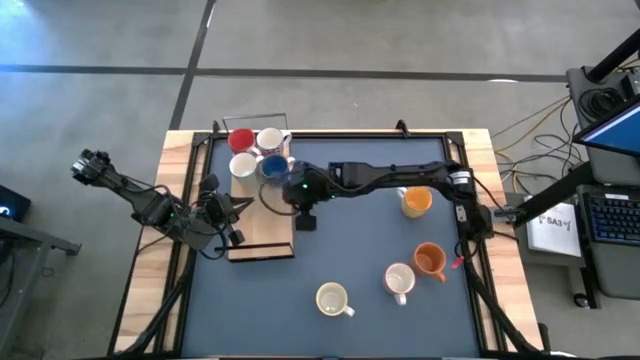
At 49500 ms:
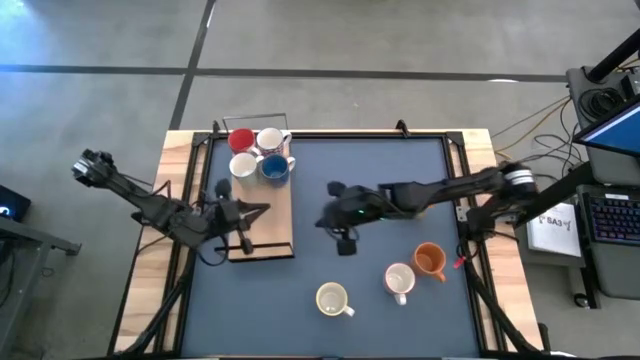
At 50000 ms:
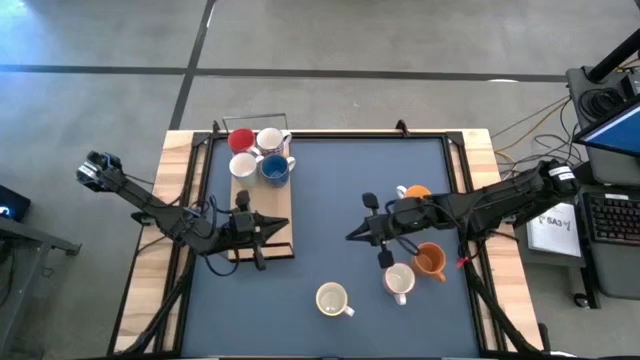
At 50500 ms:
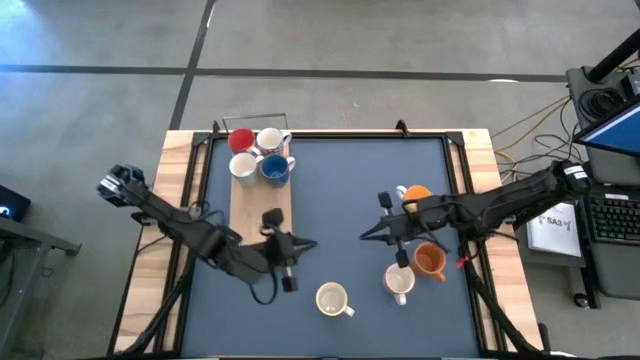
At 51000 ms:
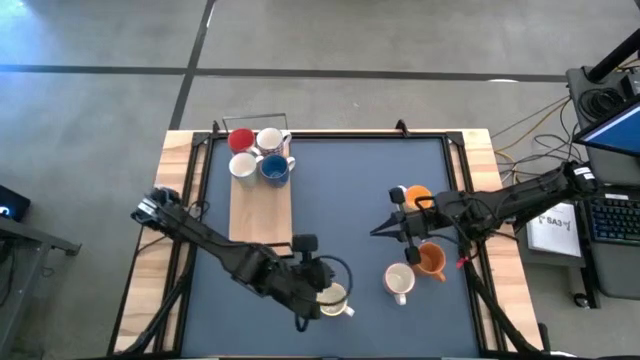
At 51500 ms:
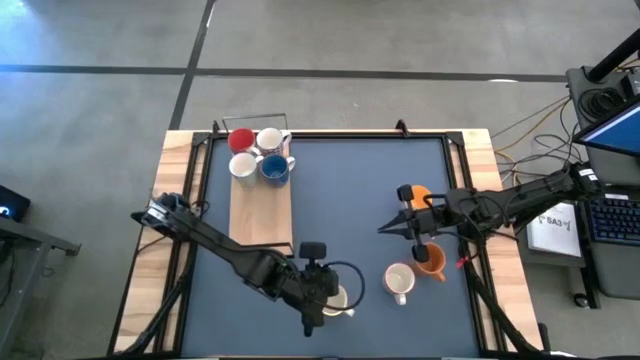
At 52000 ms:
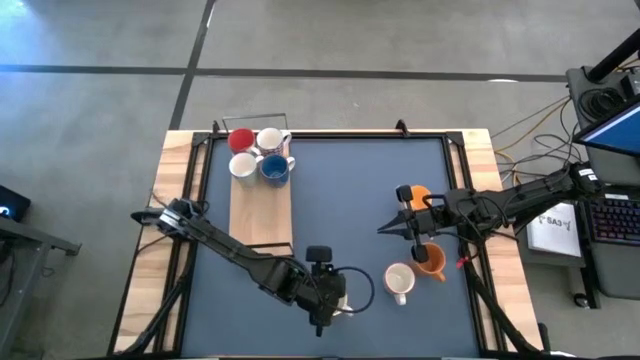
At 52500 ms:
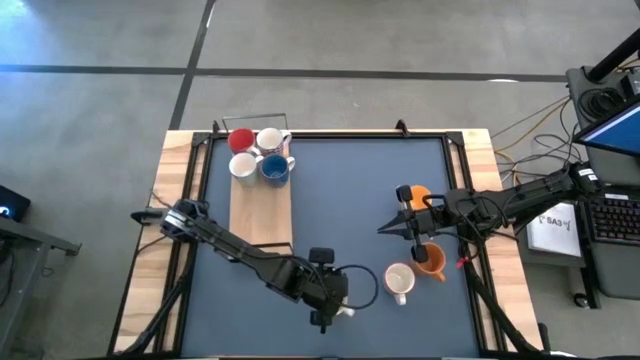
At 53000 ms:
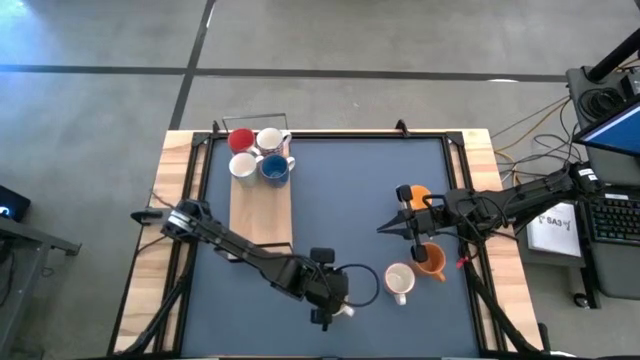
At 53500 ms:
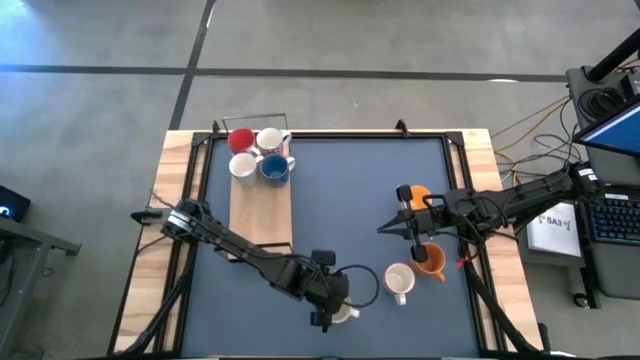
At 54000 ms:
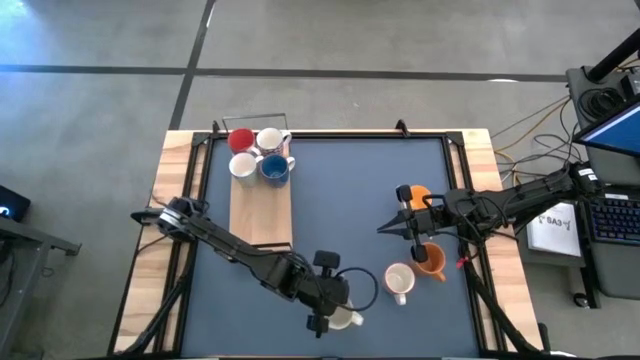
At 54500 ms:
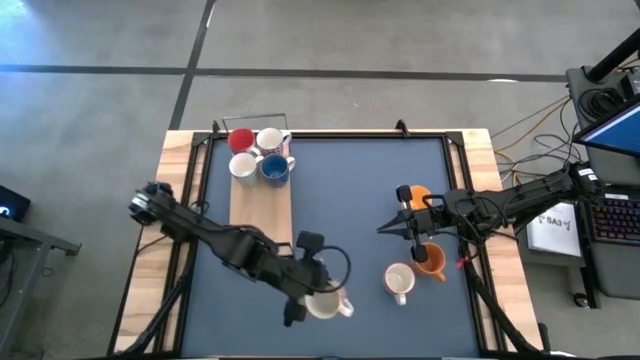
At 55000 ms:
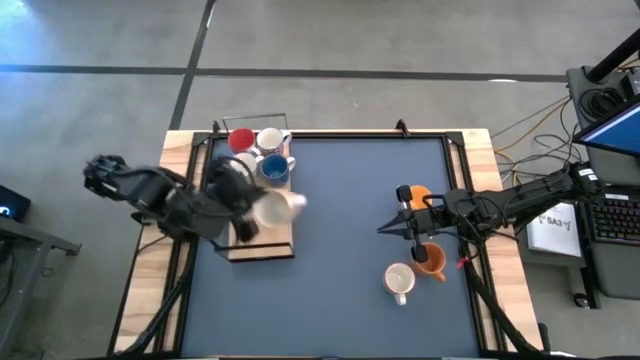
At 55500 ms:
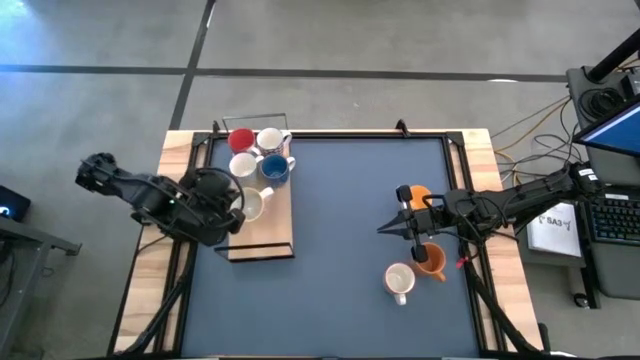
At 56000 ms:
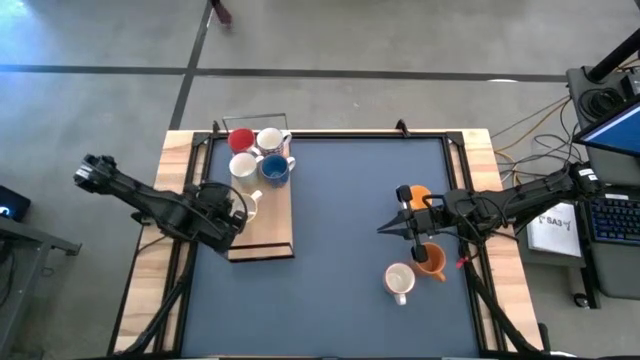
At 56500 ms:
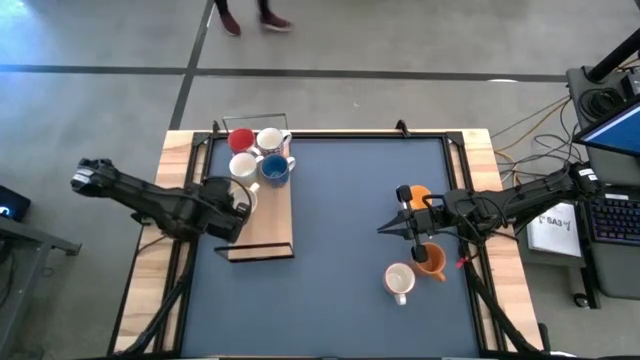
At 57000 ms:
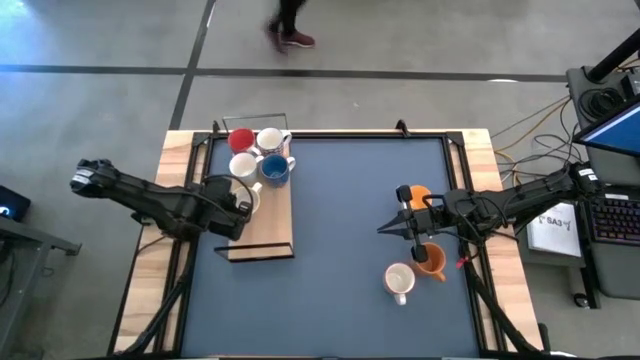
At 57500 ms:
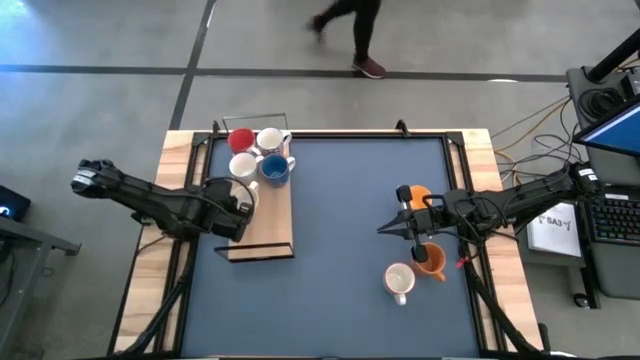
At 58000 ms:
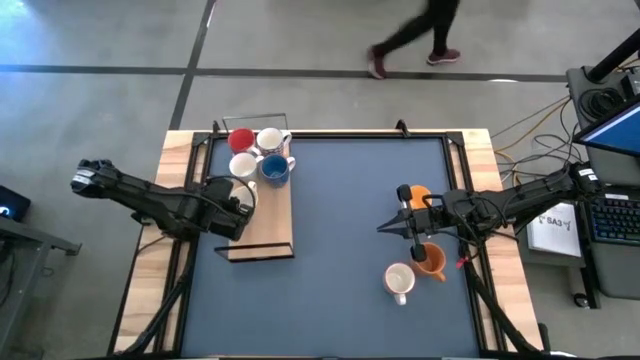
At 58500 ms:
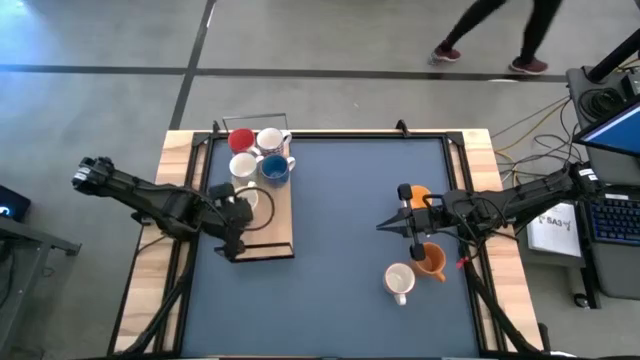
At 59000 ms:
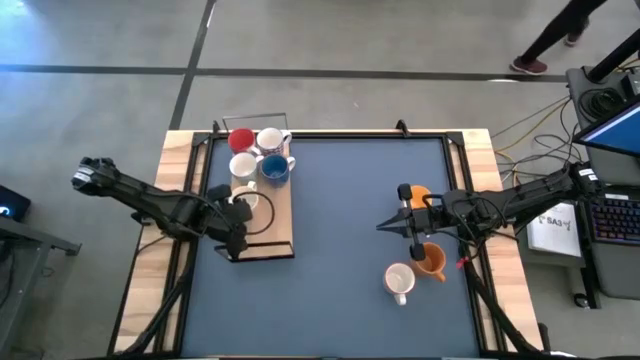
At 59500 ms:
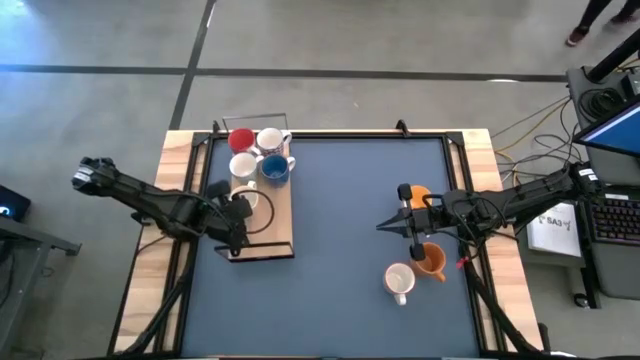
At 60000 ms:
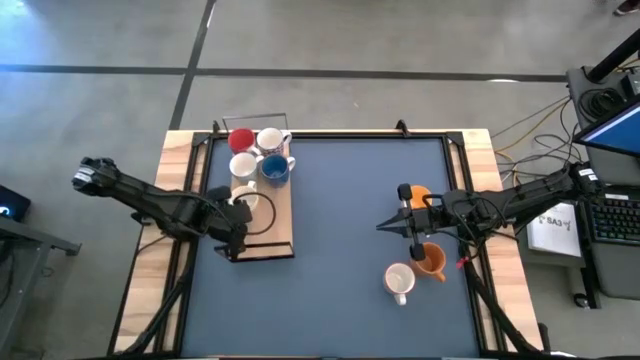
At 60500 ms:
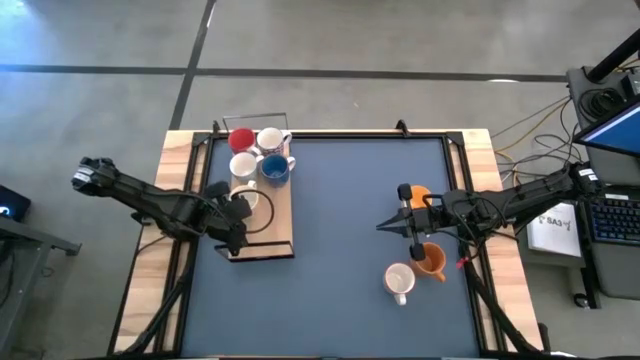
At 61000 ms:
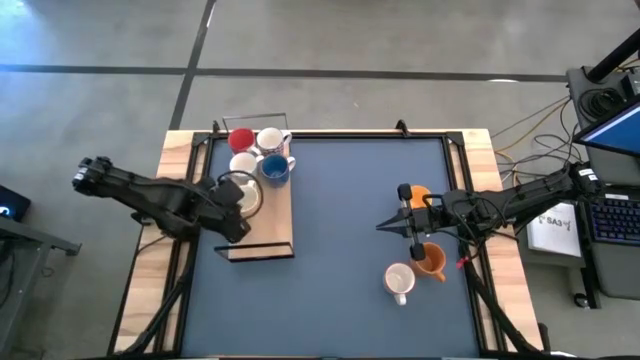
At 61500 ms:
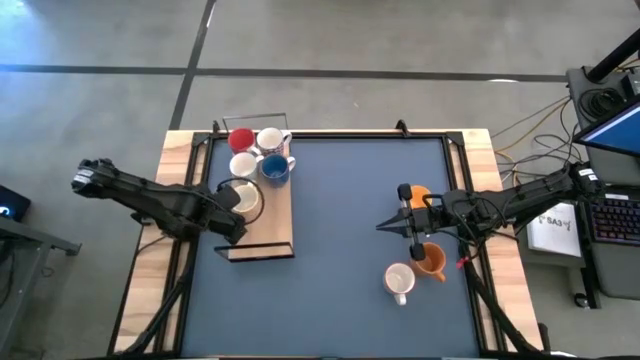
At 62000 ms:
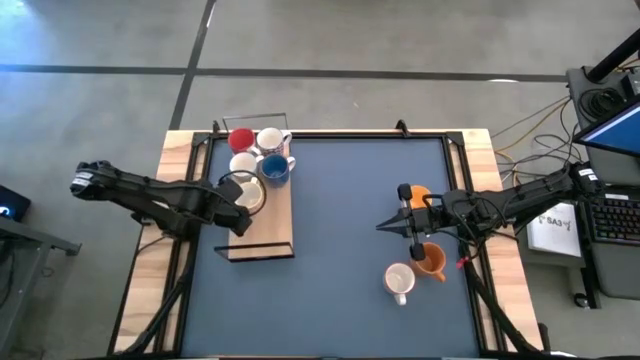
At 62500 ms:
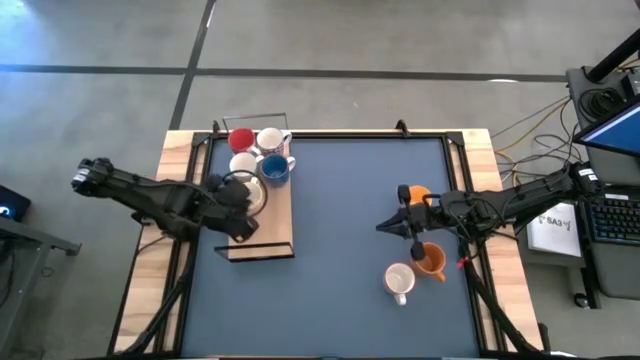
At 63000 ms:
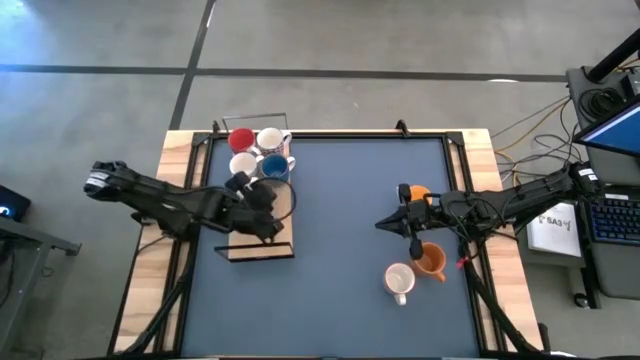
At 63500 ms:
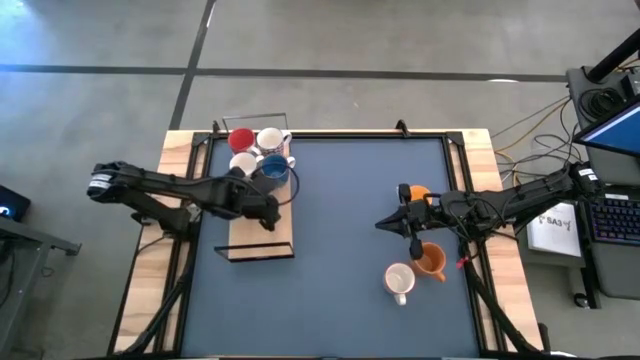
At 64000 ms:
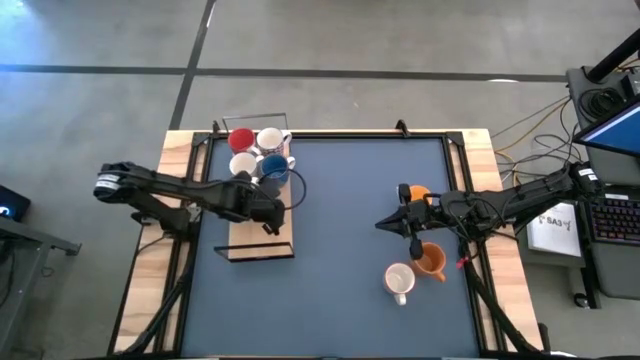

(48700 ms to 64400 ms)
Task: Place coffee mugs
Put the orange patterned mug on the shelf

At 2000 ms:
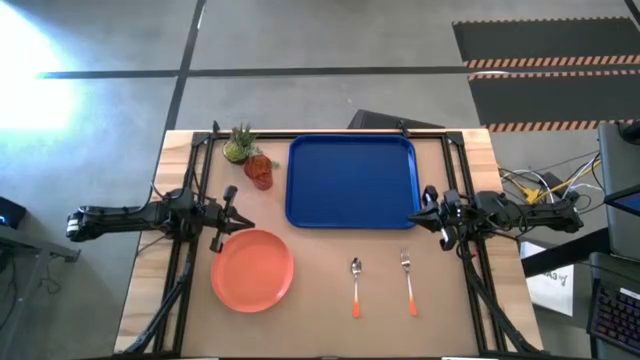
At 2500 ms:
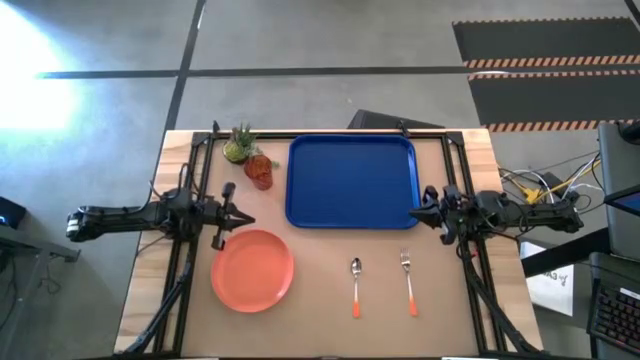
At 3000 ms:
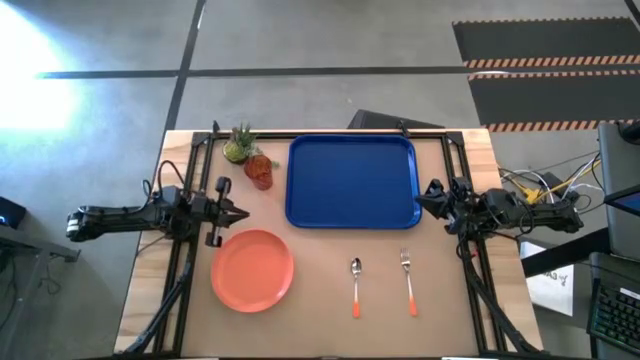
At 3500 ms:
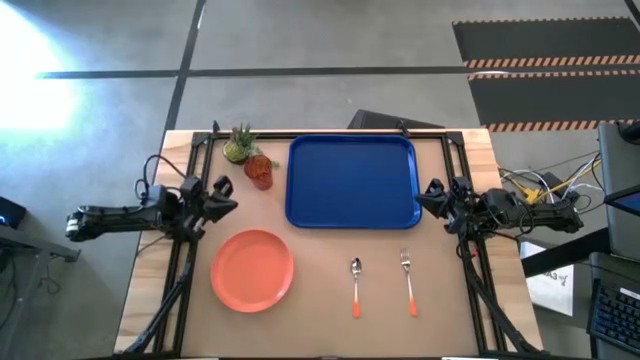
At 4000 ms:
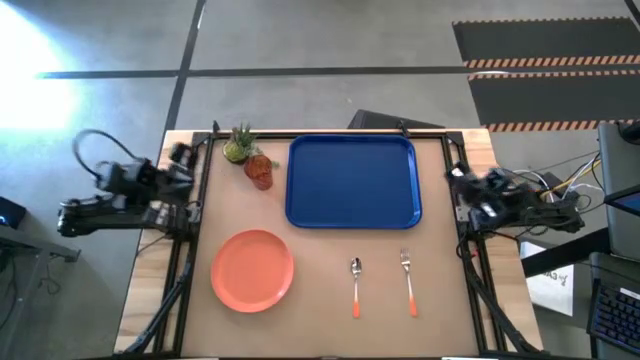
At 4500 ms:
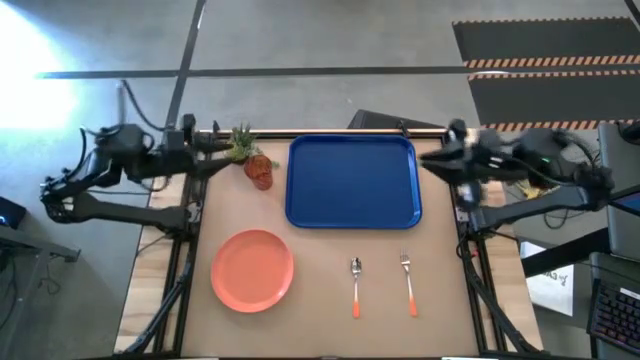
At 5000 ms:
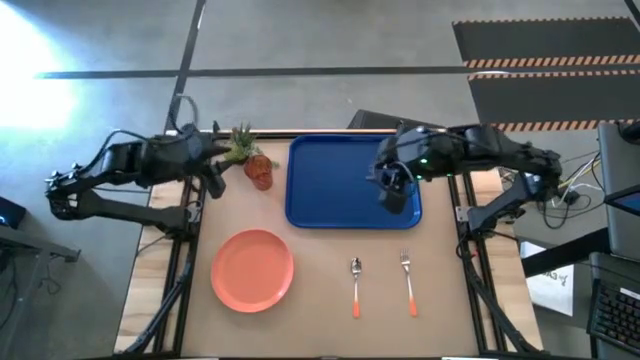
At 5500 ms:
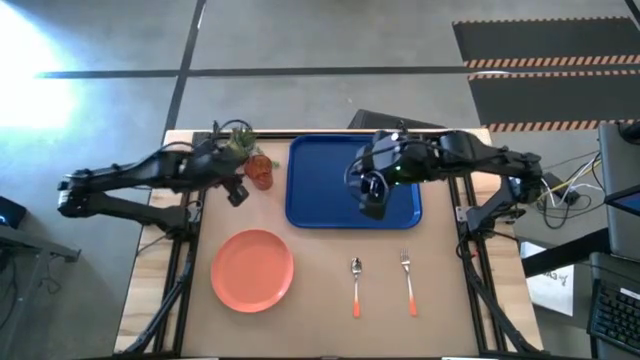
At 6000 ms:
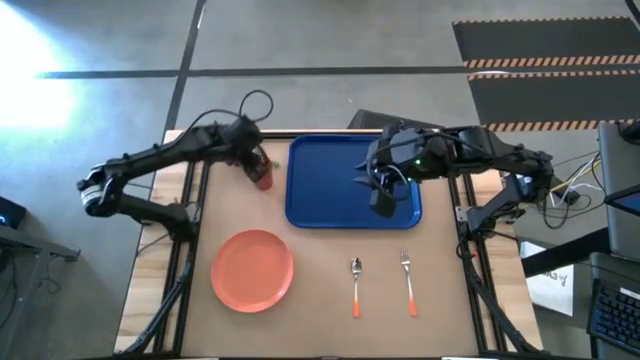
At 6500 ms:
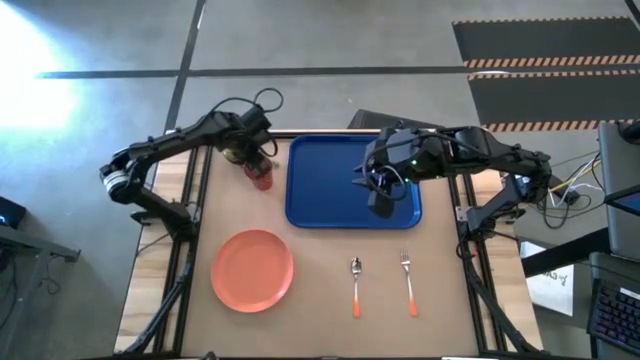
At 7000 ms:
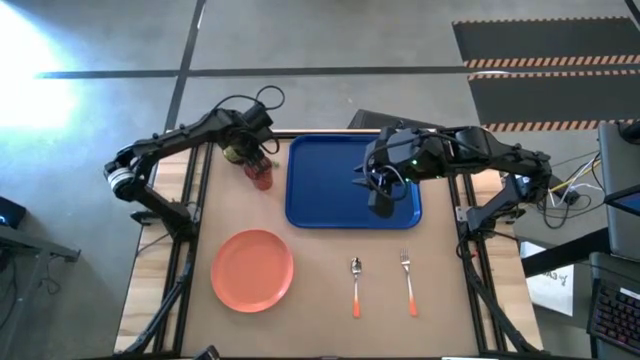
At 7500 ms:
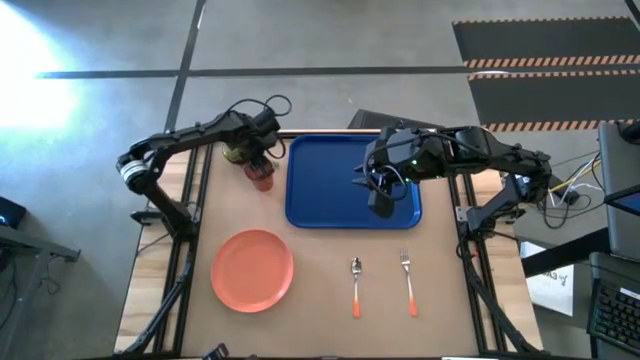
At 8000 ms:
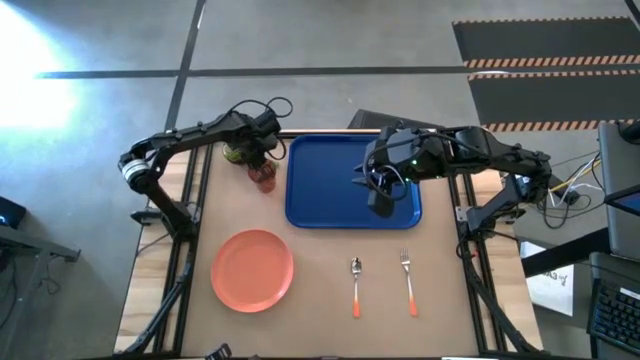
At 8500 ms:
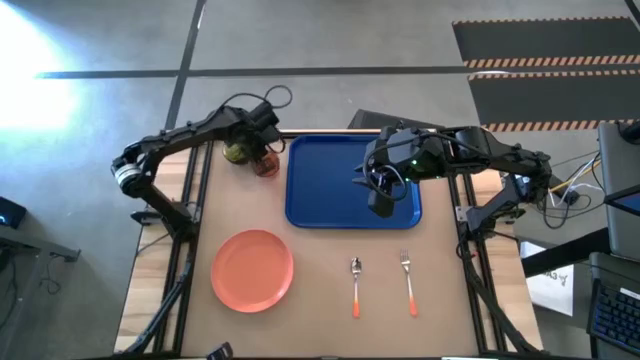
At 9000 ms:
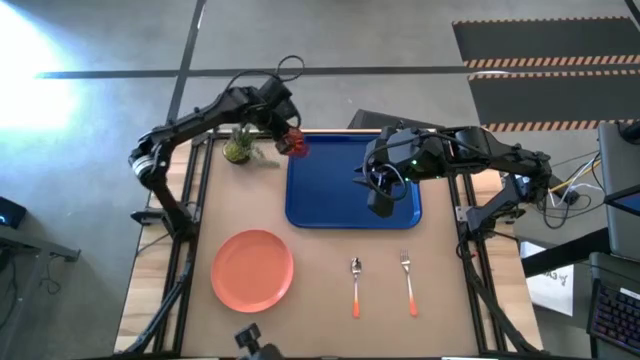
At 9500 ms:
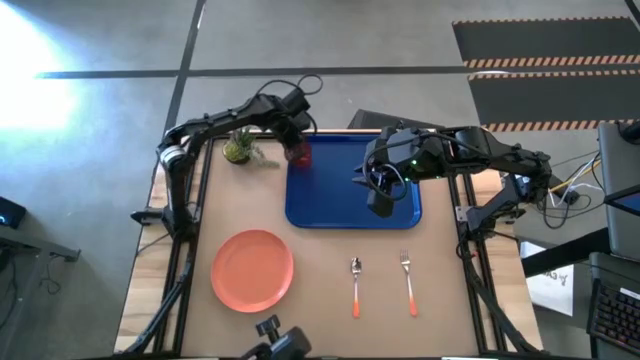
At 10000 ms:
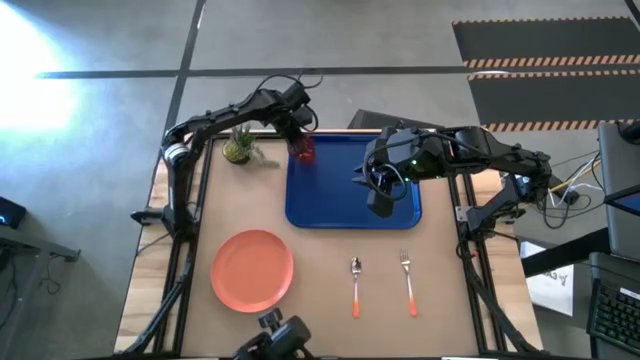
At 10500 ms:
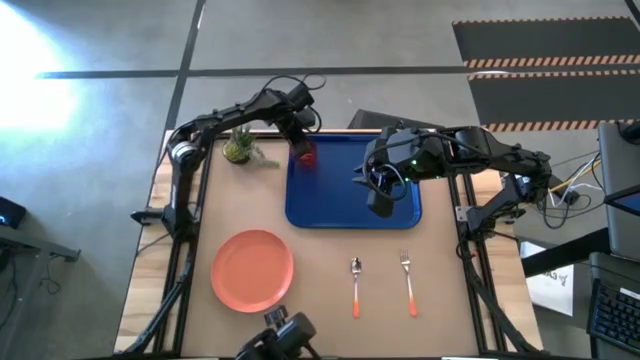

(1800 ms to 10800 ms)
Task: Pick and place plate/cup/fork/spoon on tray
Put the glass on the top left of the serving tray
